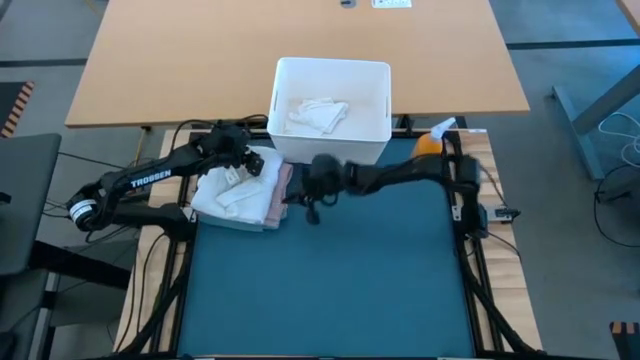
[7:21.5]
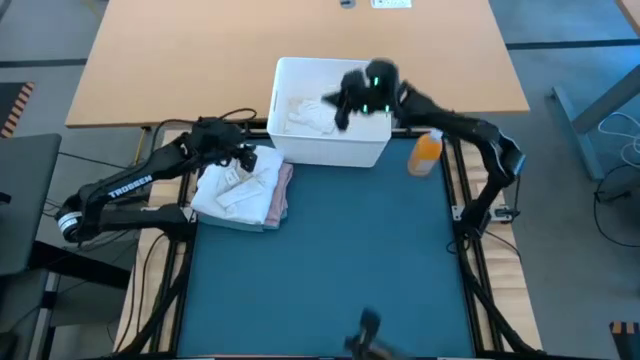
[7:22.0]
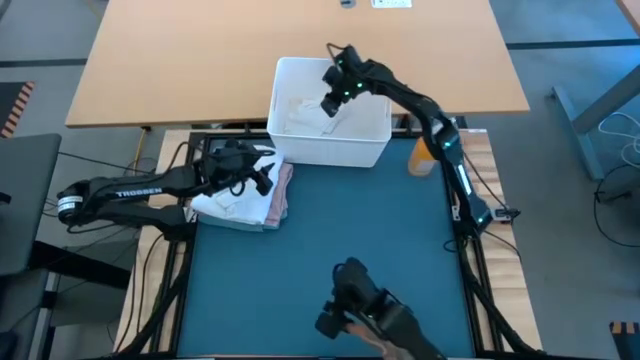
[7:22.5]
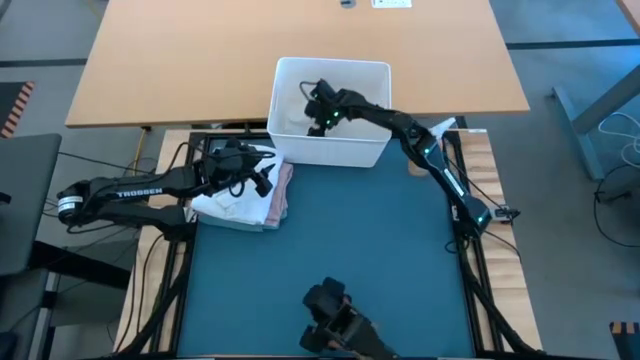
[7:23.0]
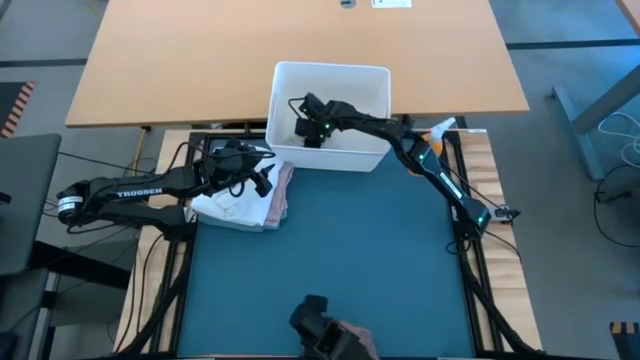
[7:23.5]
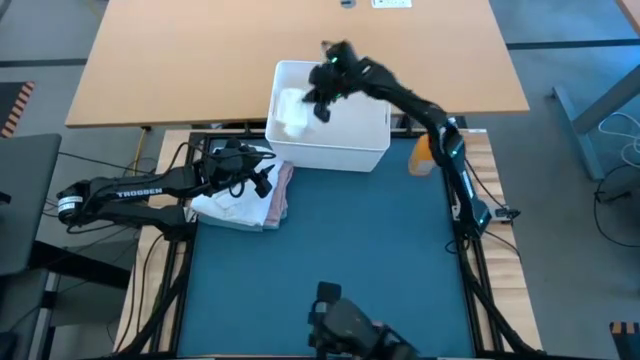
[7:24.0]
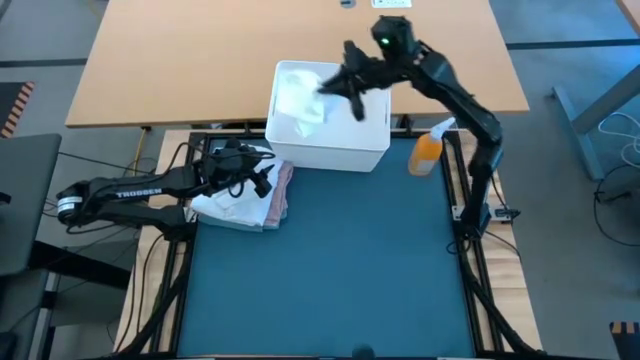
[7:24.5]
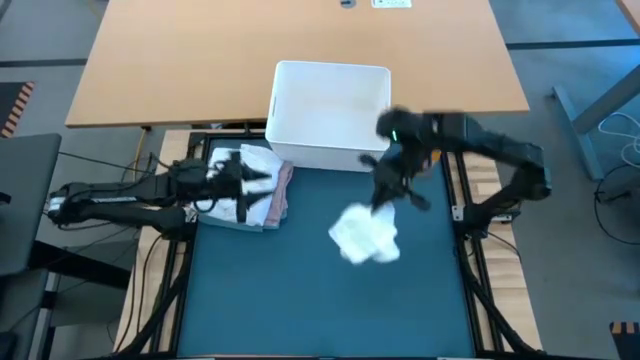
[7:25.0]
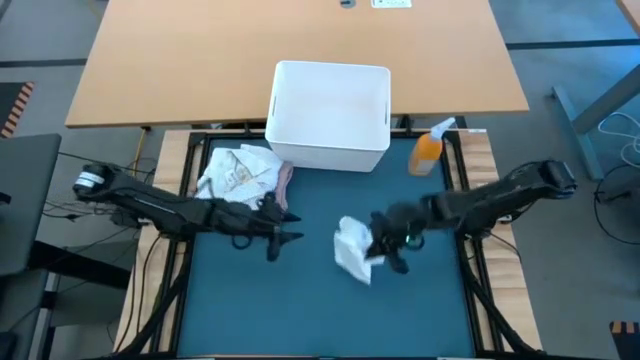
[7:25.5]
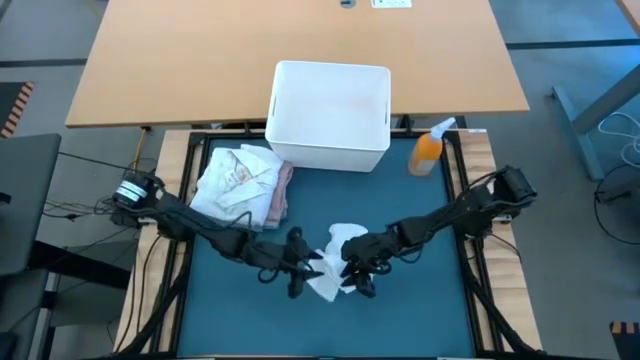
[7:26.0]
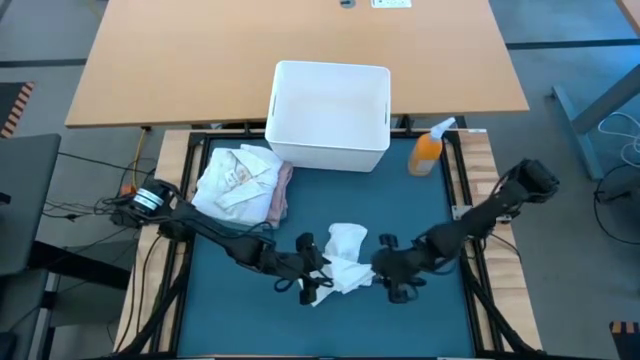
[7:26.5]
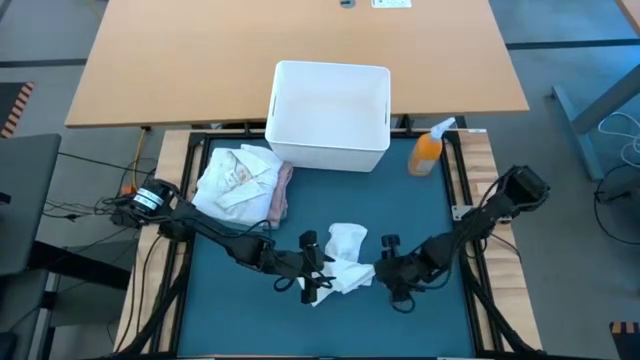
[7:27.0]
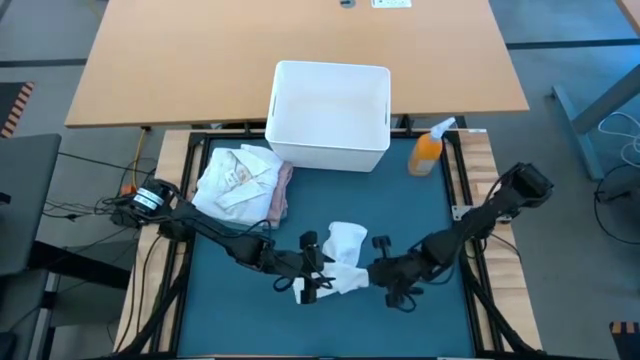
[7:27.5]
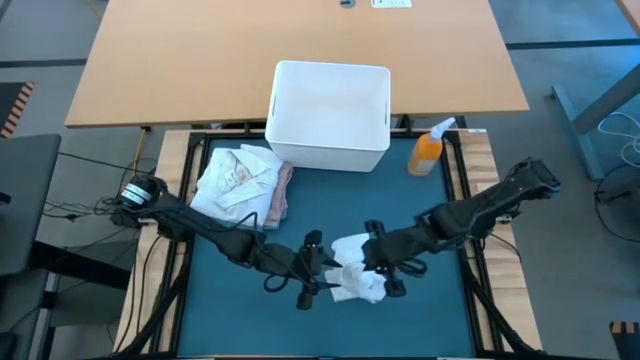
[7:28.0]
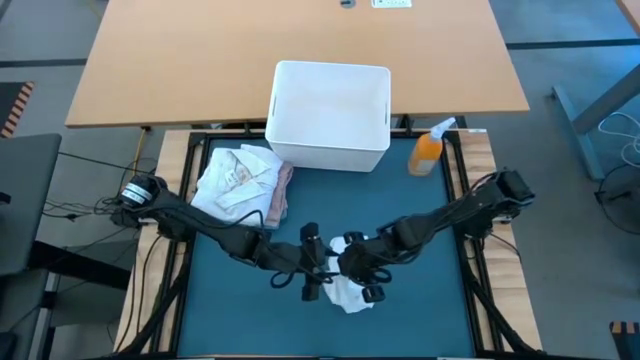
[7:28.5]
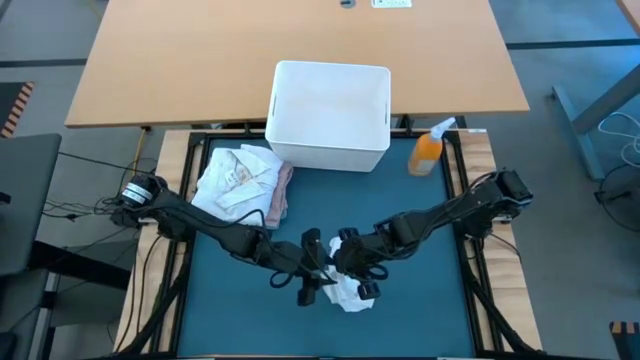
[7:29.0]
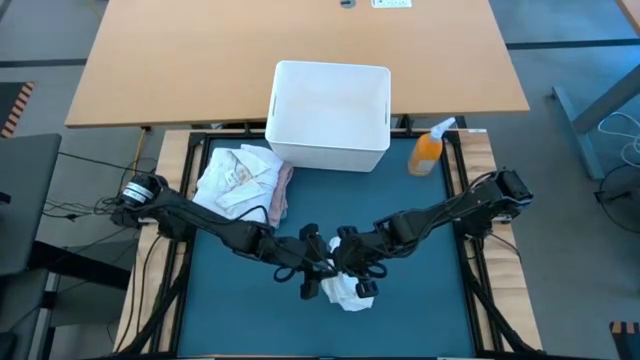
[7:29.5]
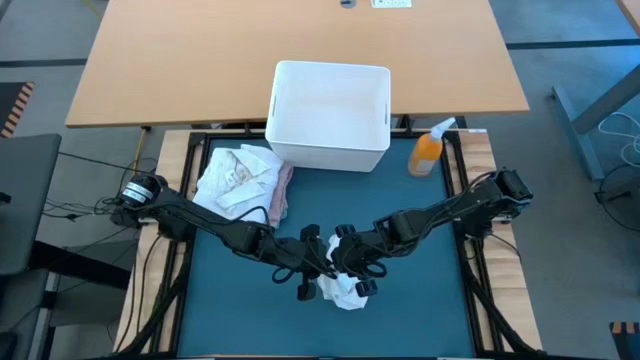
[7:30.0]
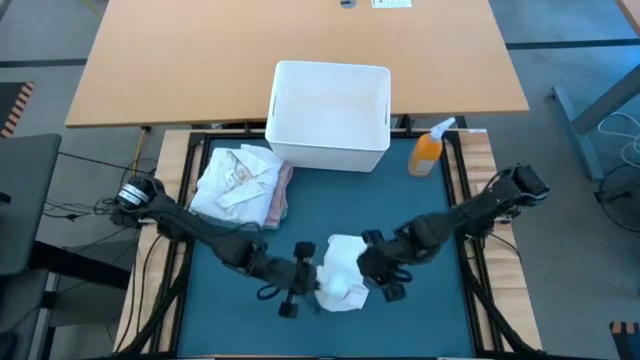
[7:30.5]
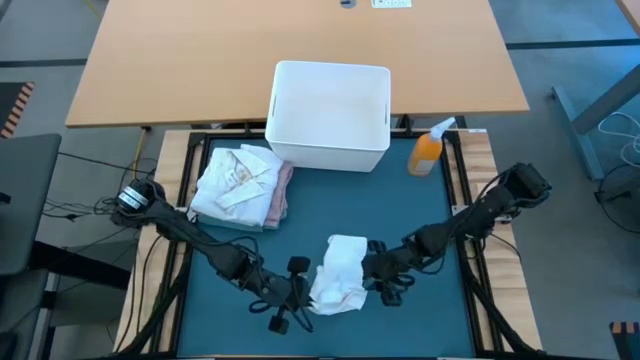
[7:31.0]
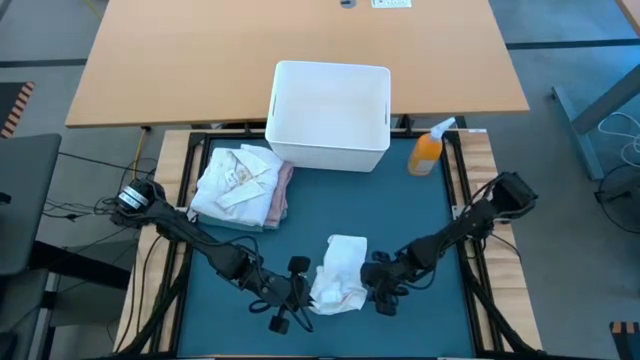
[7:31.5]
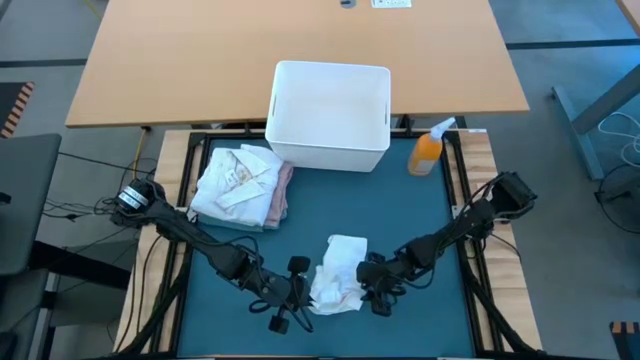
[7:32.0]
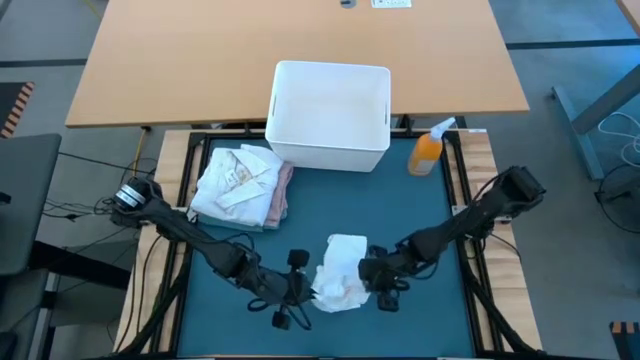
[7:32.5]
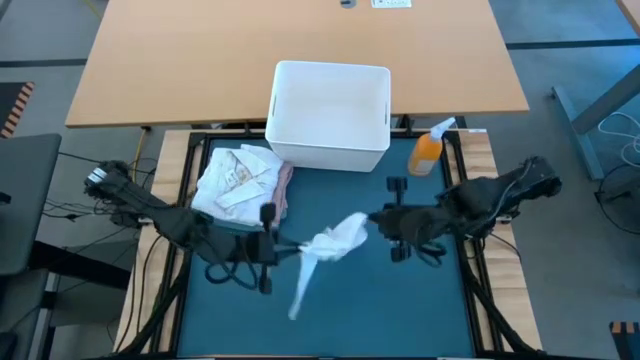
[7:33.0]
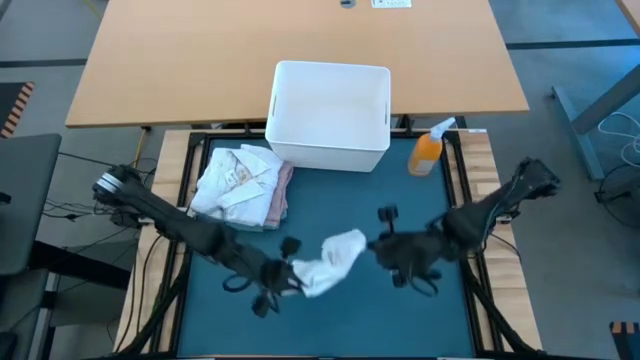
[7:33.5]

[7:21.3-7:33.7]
Task: Fold Laundry from Bin
Fold the white shorts

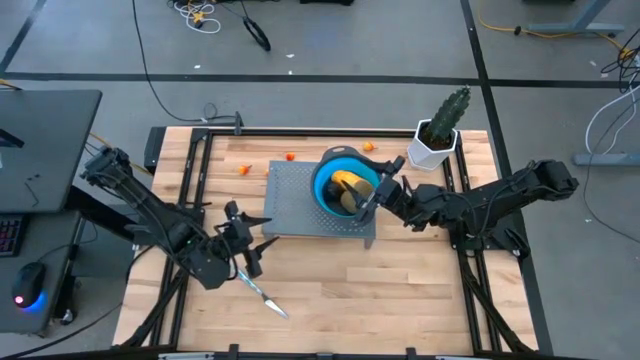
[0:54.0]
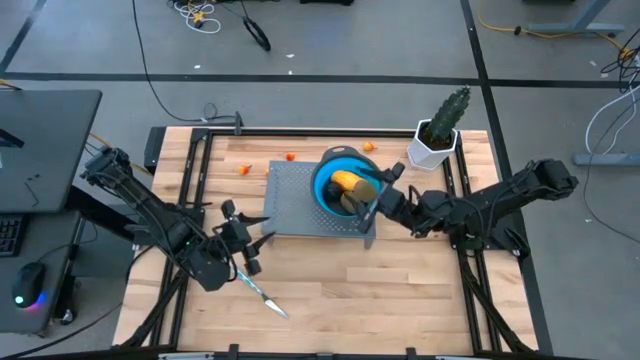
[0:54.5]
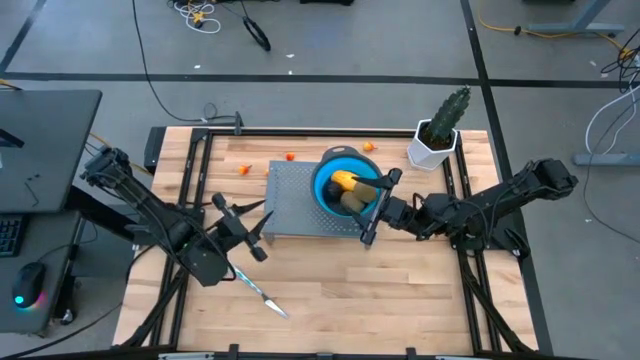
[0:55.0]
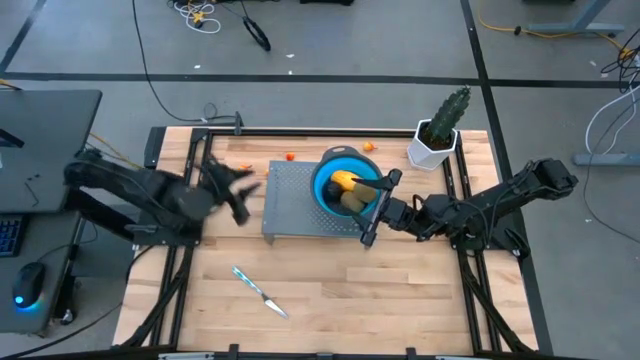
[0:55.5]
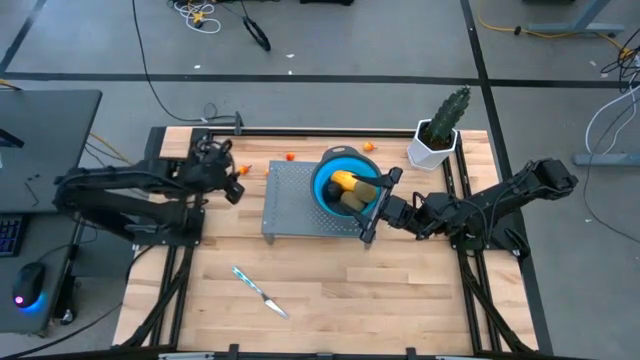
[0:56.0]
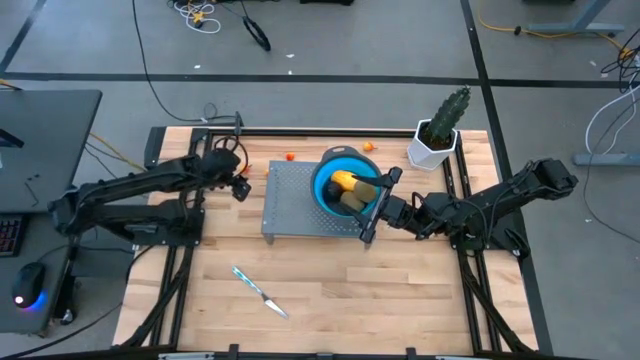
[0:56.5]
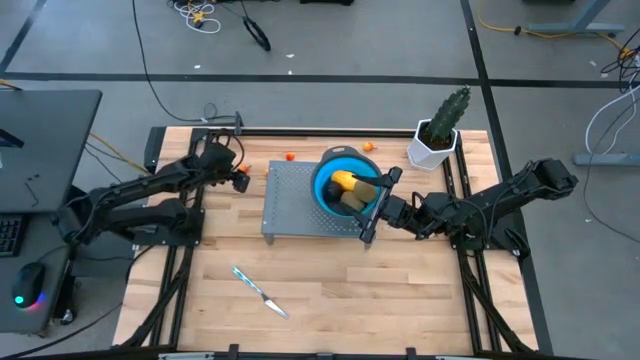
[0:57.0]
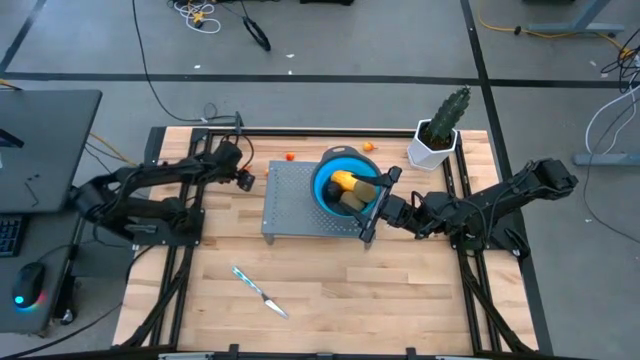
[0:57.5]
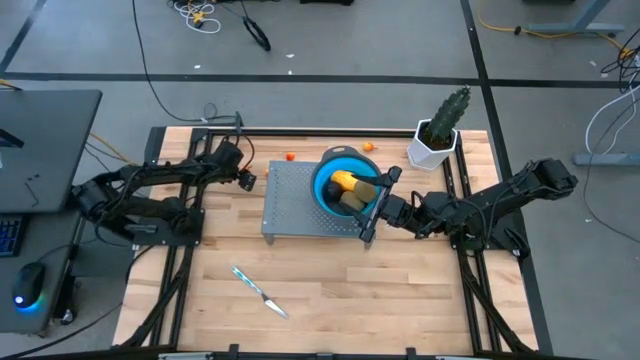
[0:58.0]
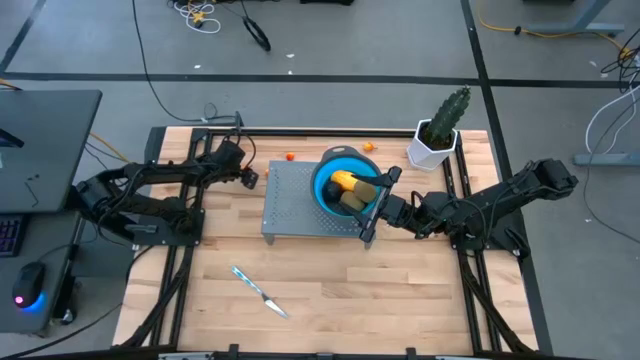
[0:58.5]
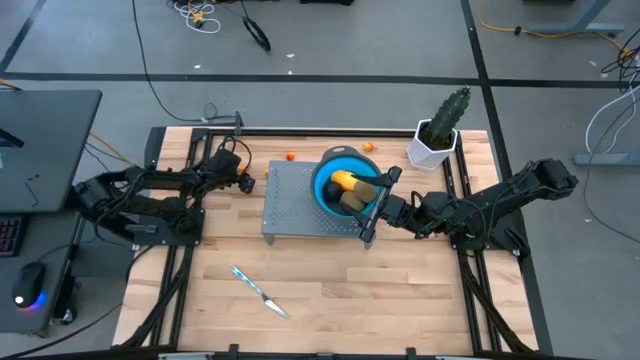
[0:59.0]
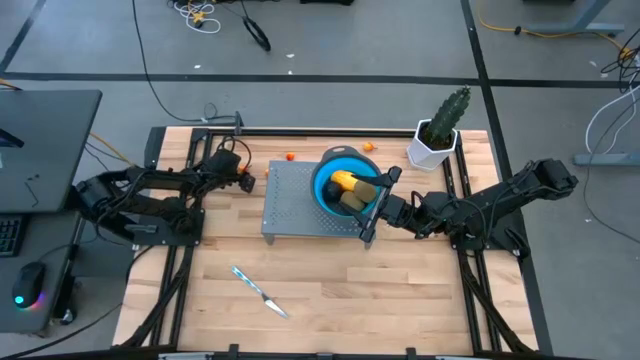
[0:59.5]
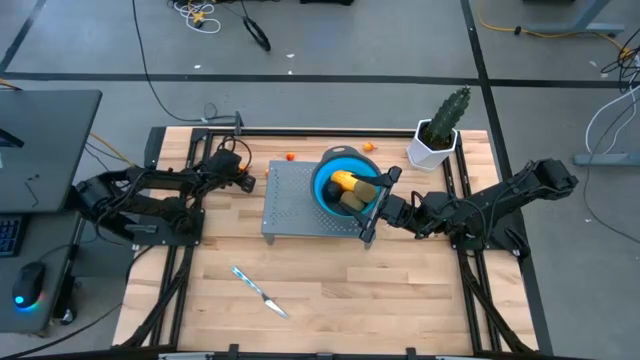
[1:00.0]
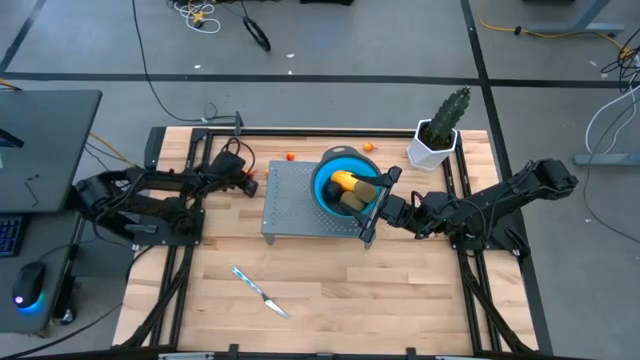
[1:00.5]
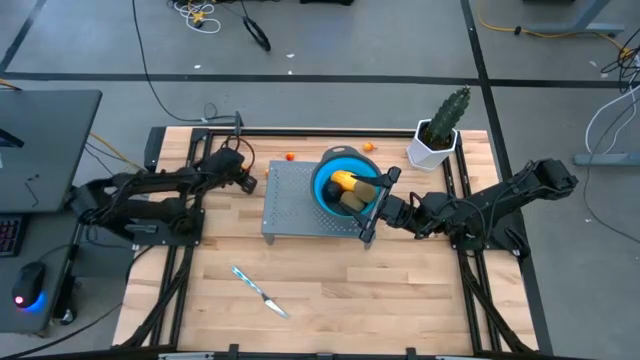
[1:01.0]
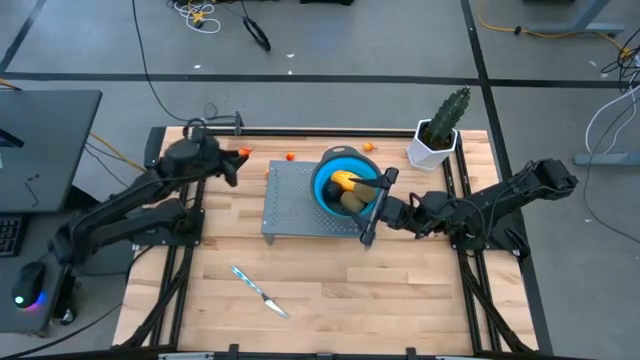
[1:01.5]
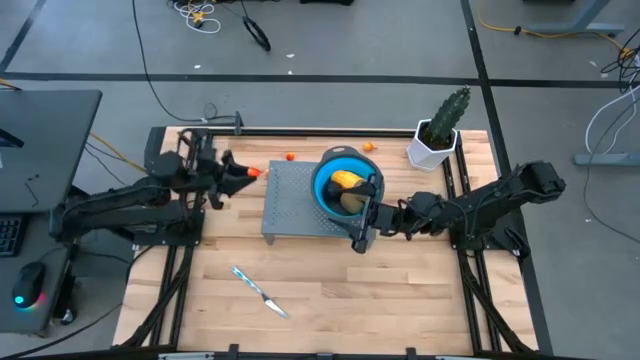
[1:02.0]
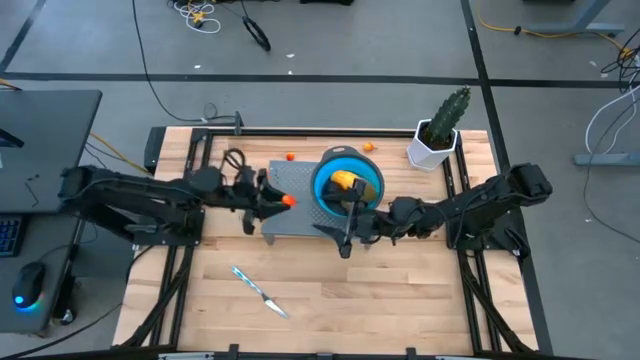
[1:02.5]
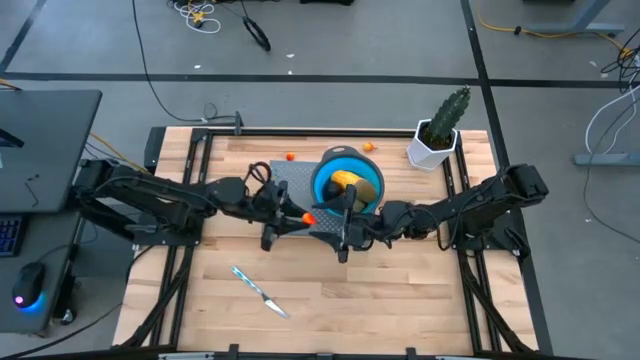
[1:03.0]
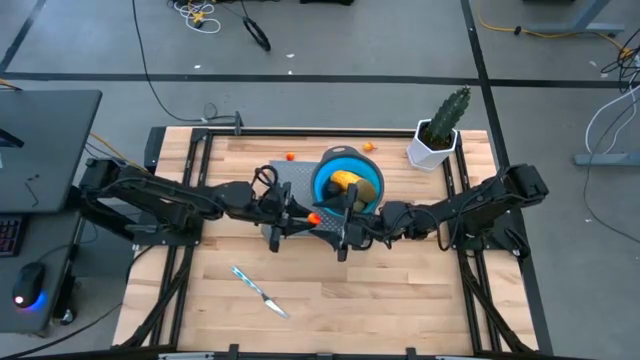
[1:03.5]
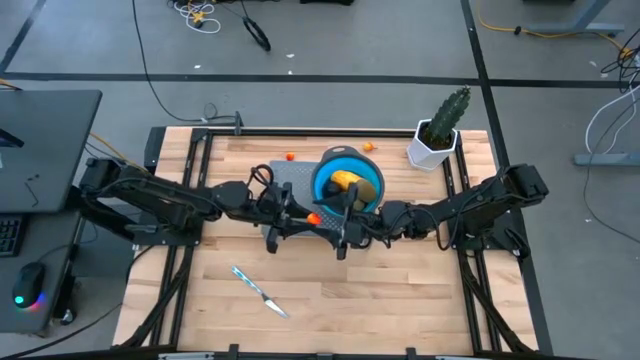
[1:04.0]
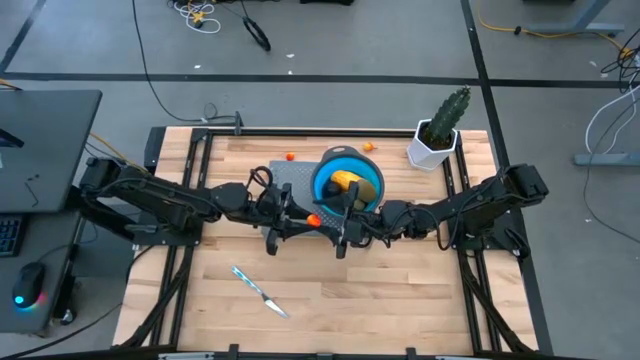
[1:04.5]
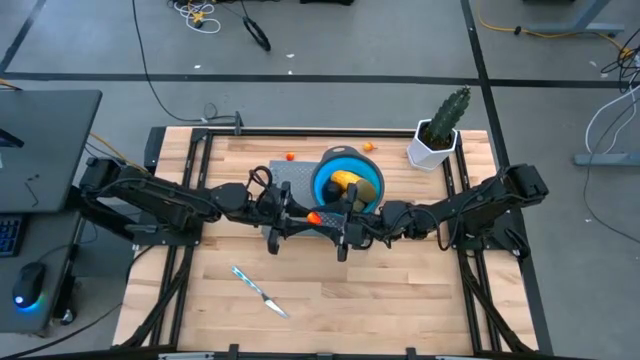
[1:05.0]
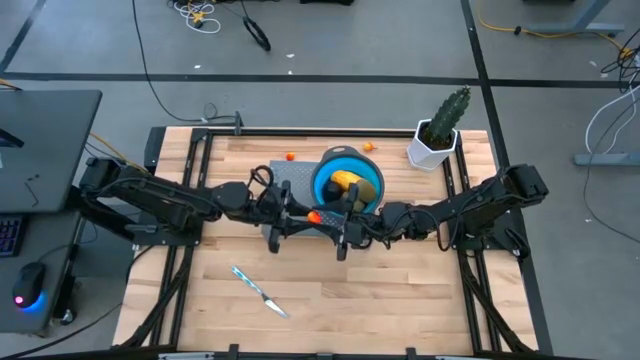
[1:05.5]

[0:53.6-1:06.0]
Task: Pick & Place Fruit
Put the orange pear into the blue strainer bowl on the shelf
